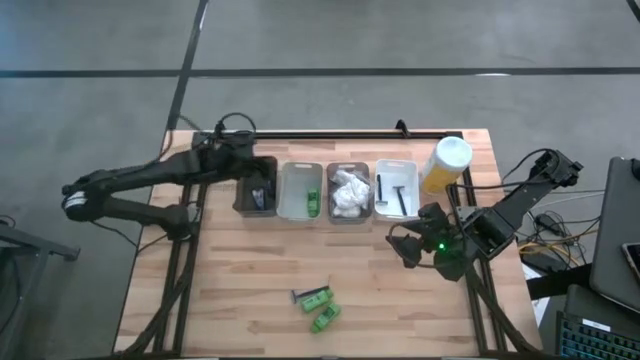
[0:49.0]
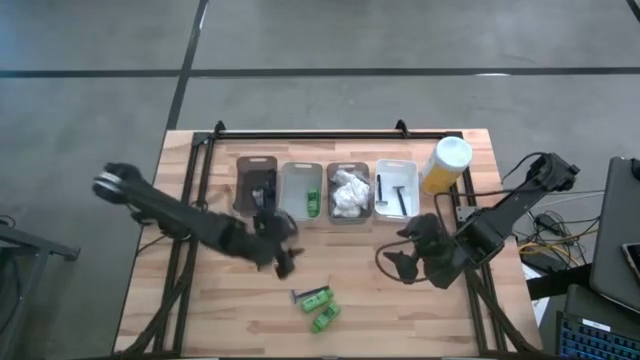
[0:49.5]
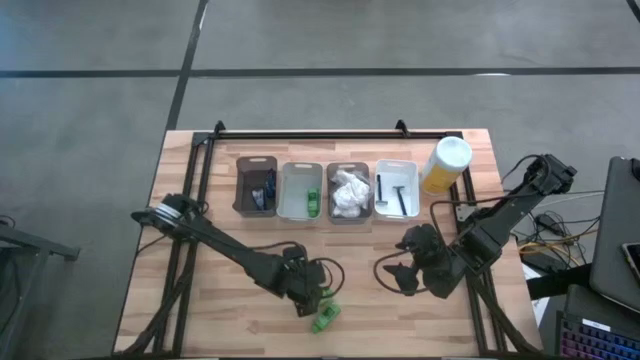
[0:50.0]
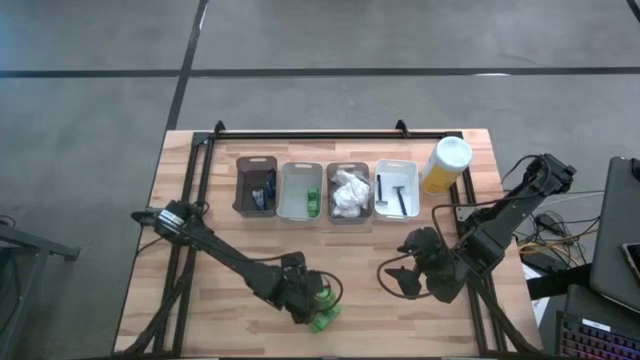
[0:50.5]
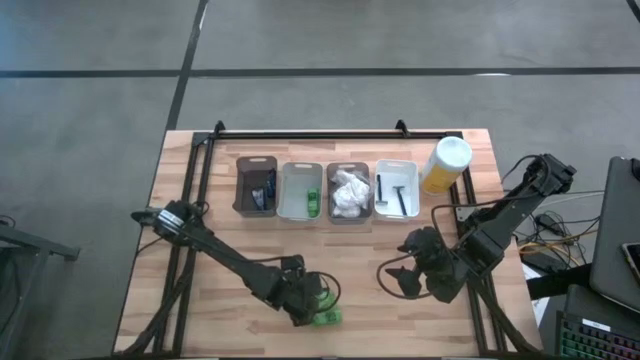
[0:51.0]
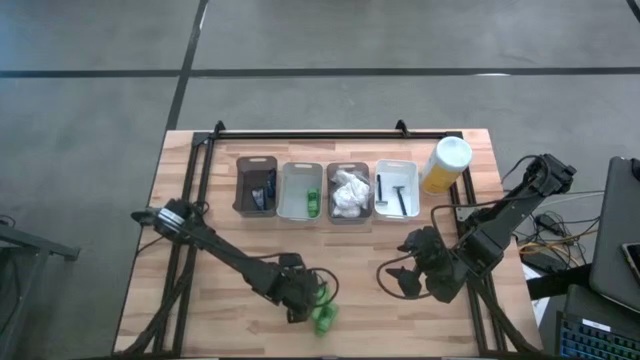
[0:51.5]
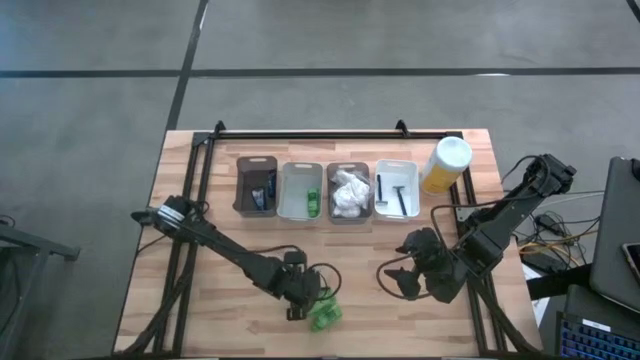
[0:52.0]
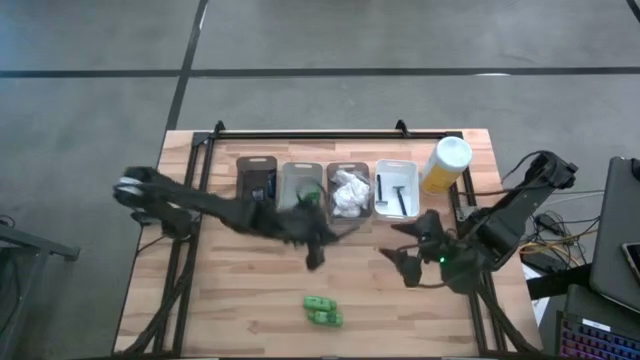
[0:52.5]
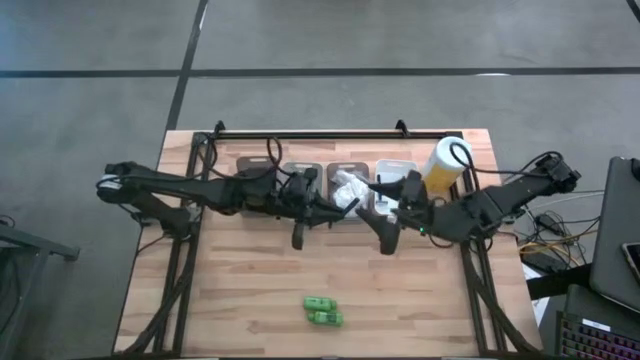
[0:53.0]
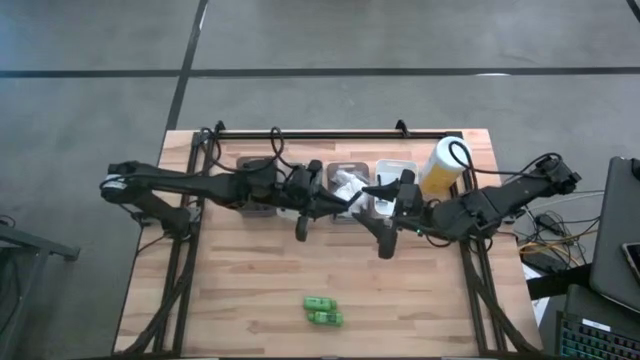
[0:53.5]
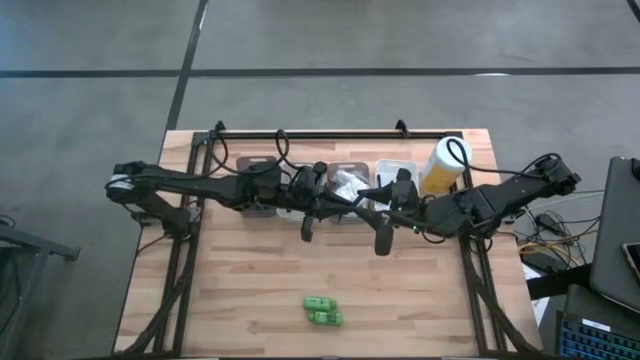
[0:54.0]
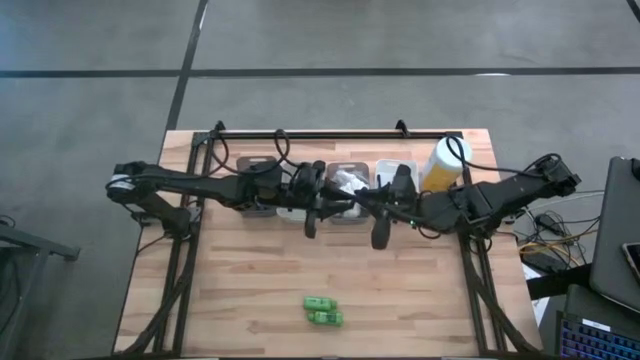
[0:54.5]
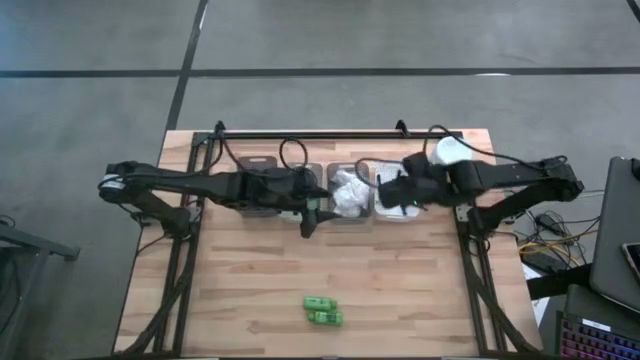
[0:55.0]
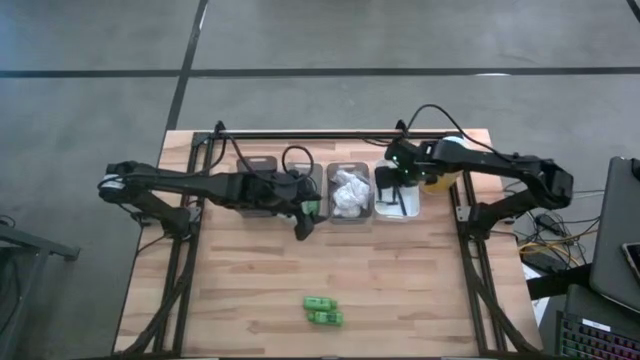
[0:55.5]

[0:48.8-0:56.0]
Task: Pick & Place Travel size toiletries
Put the blue razor into the white bin

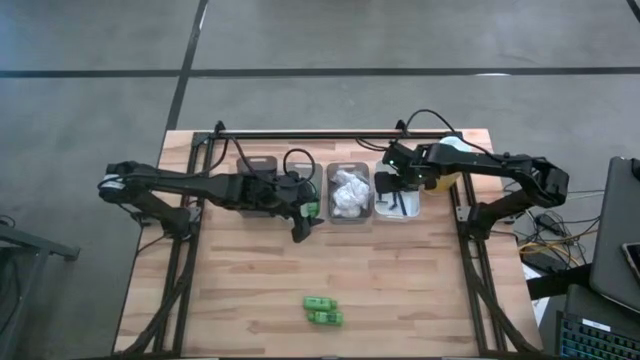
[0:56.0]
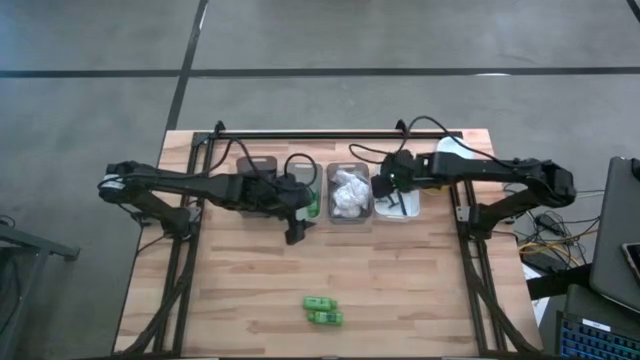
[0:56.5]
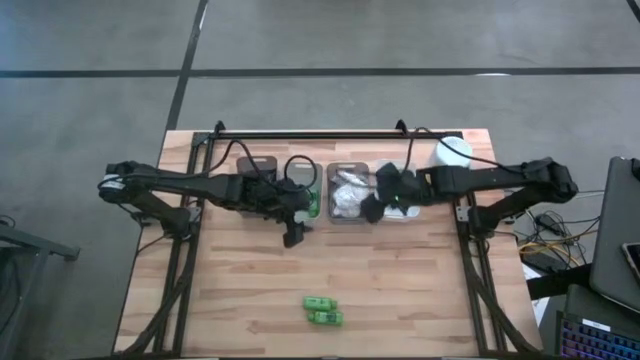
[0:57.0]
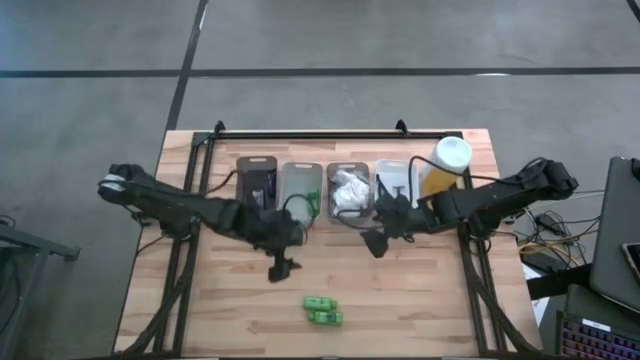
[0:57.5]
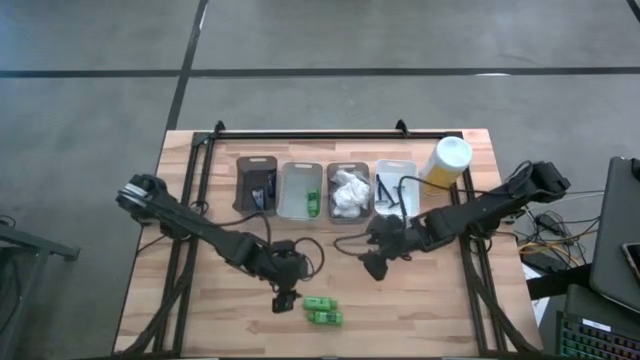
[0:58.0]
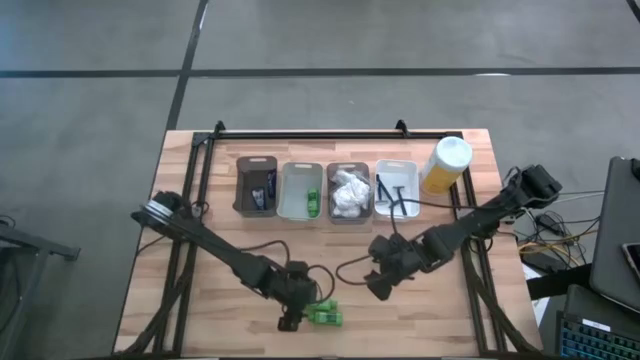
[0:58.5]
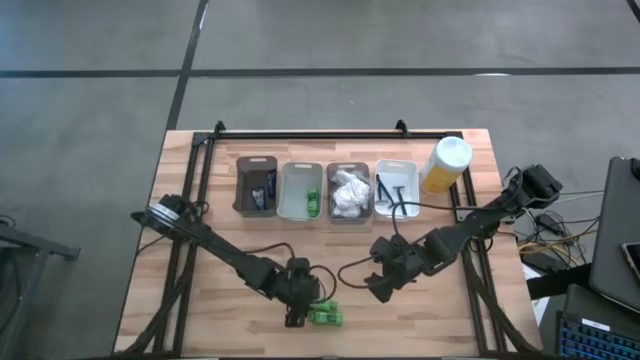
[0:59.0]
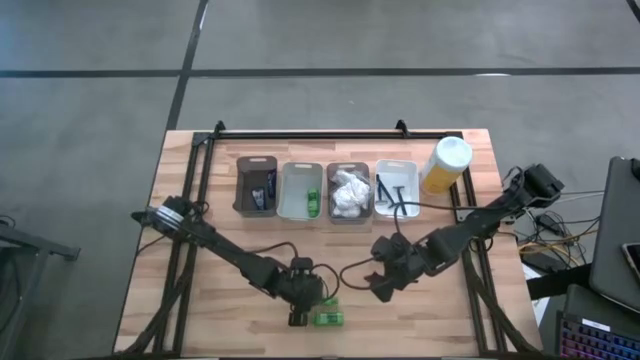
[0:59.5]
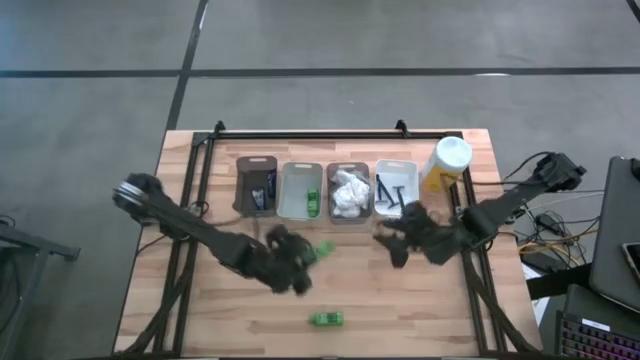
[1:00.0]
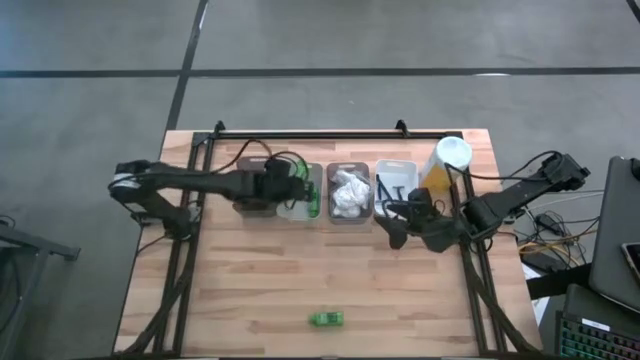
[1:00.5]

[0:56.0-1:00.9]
Put the green shampoo into the gray bin

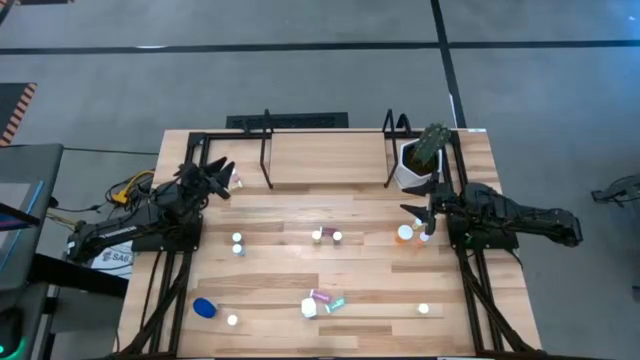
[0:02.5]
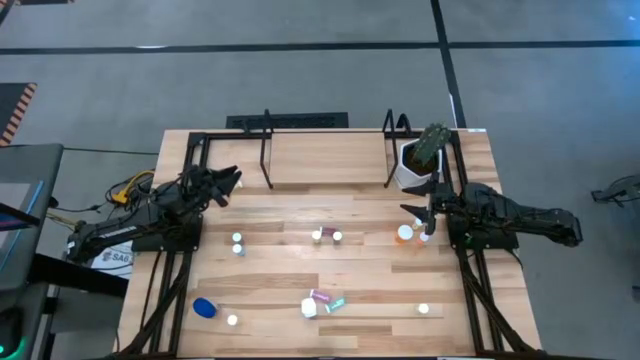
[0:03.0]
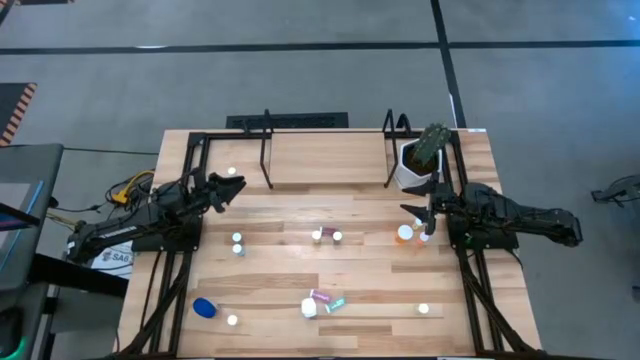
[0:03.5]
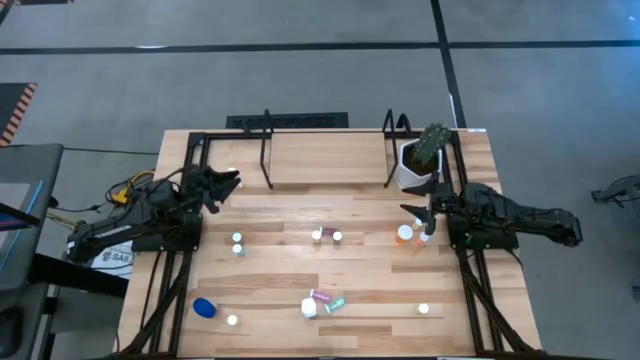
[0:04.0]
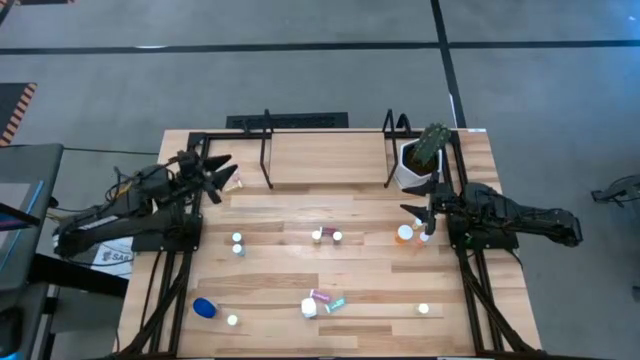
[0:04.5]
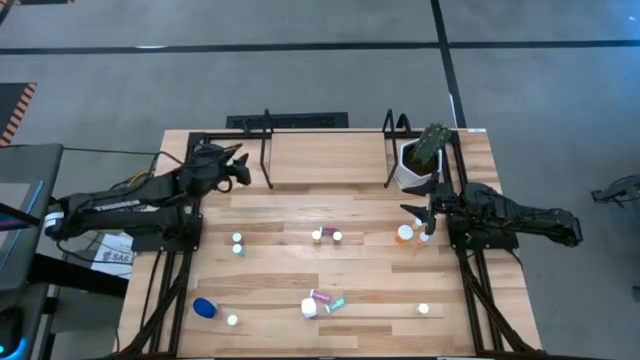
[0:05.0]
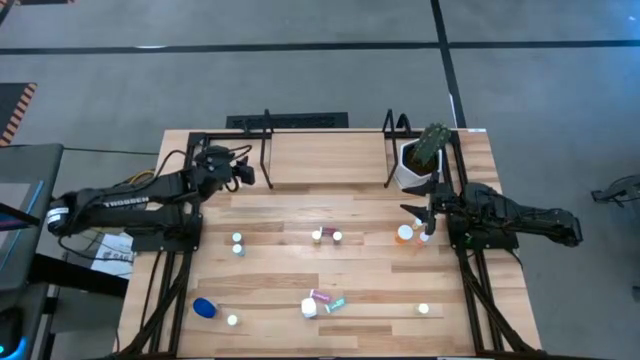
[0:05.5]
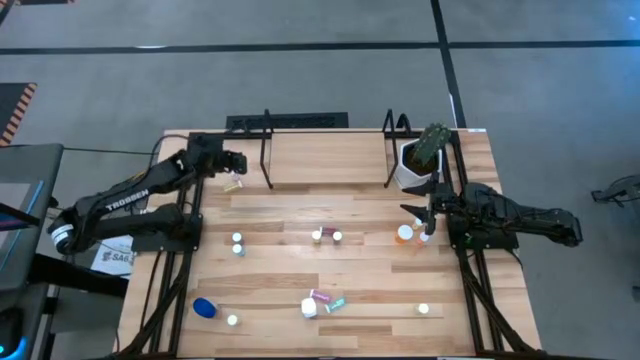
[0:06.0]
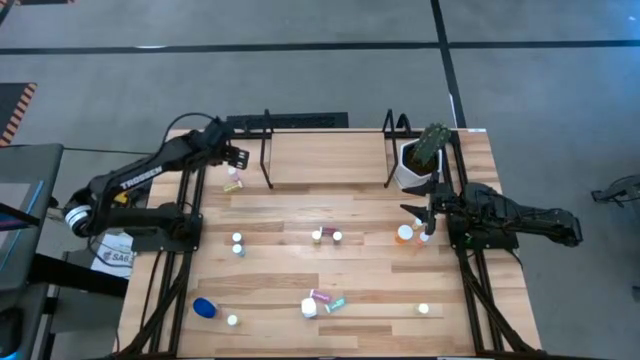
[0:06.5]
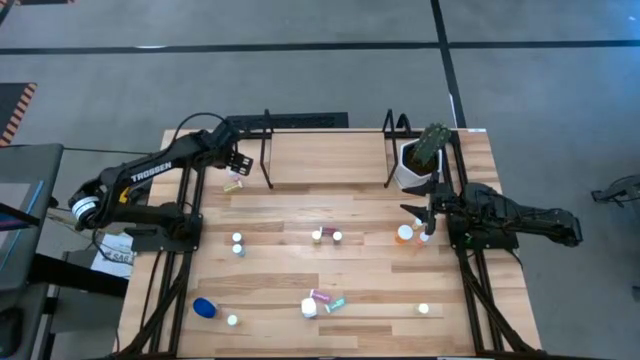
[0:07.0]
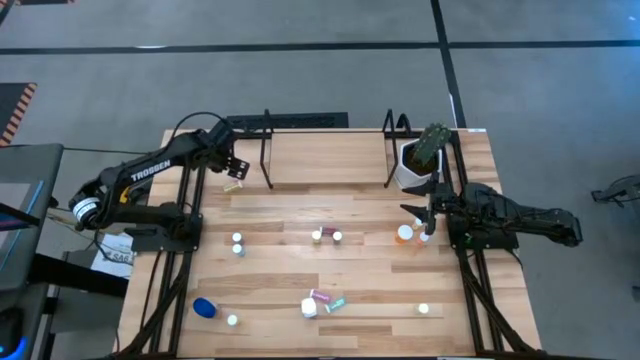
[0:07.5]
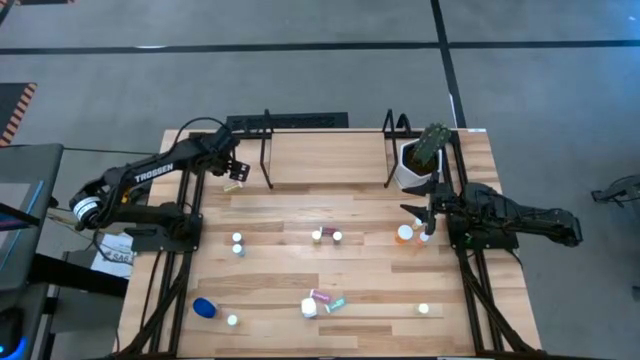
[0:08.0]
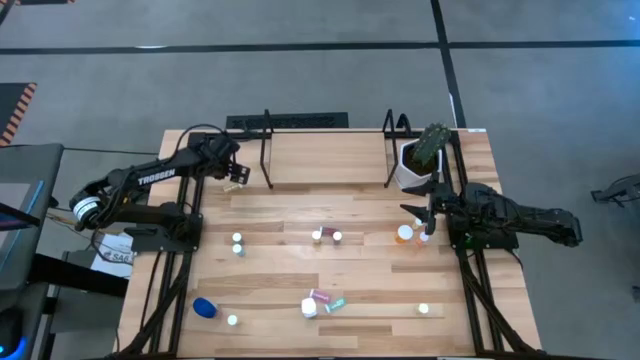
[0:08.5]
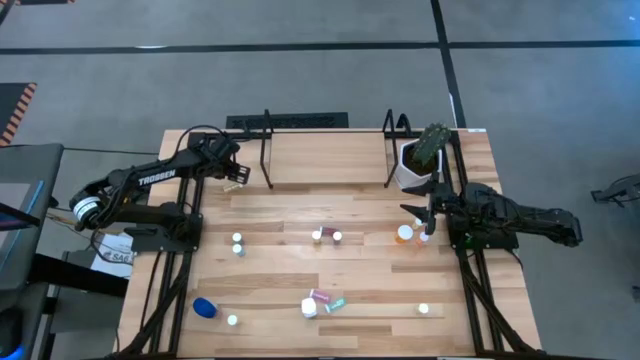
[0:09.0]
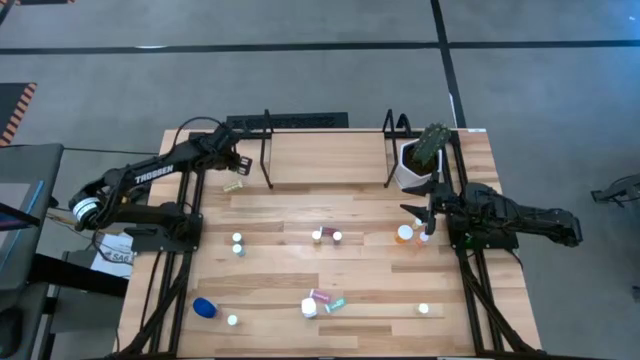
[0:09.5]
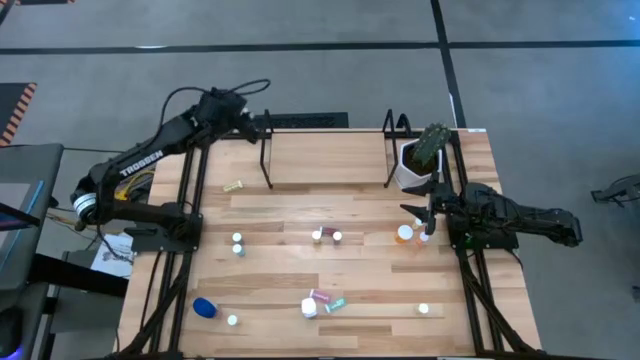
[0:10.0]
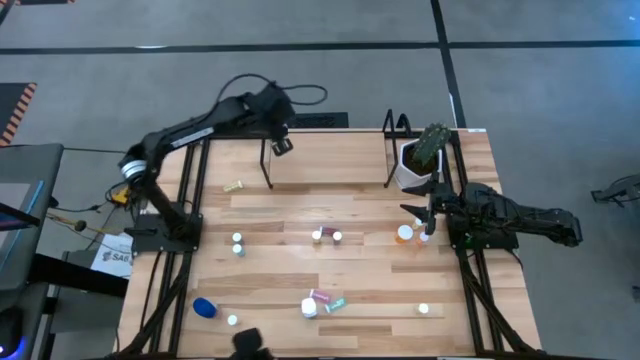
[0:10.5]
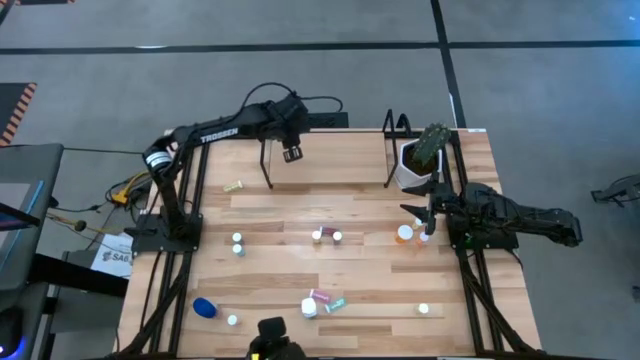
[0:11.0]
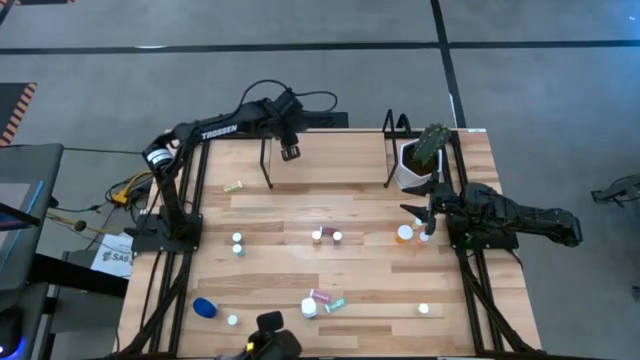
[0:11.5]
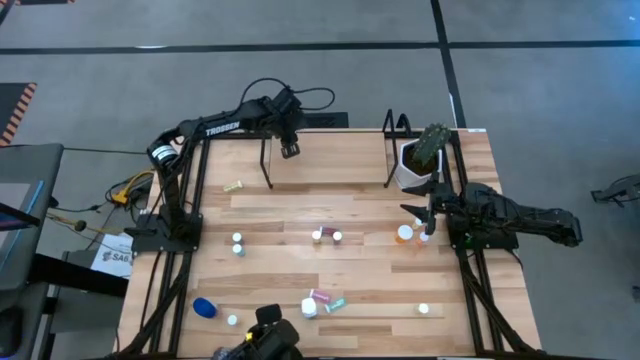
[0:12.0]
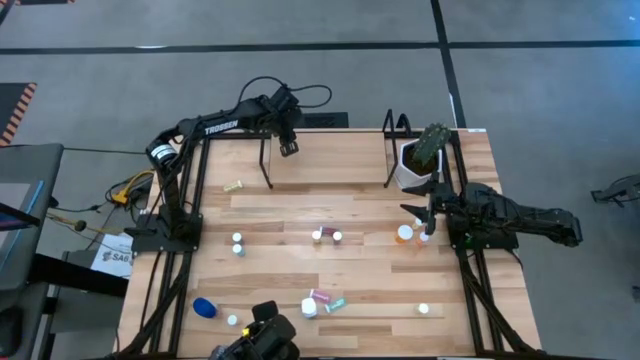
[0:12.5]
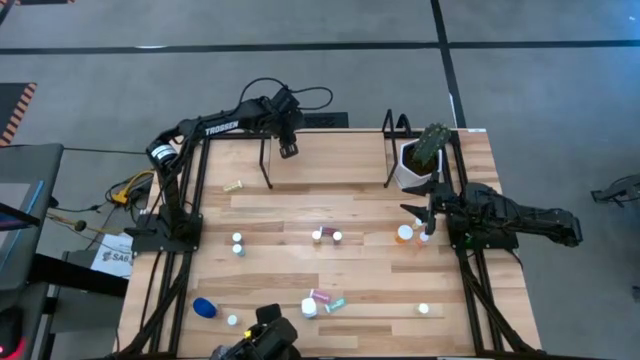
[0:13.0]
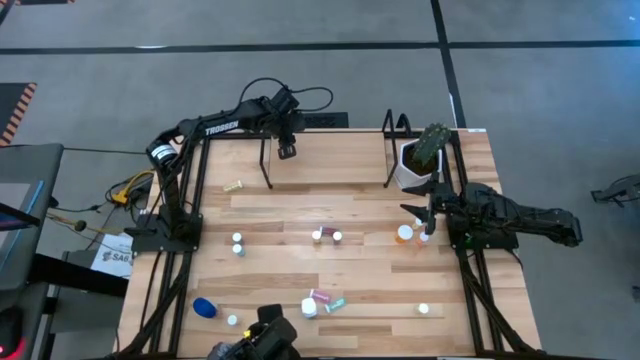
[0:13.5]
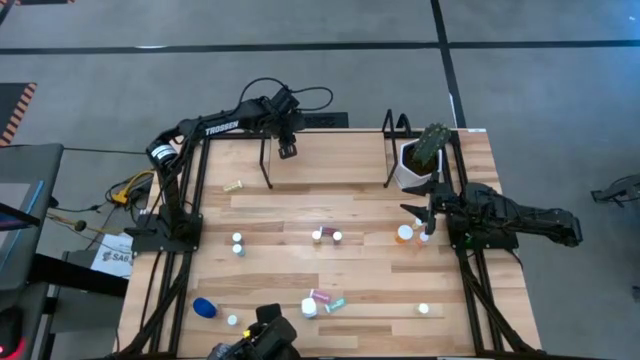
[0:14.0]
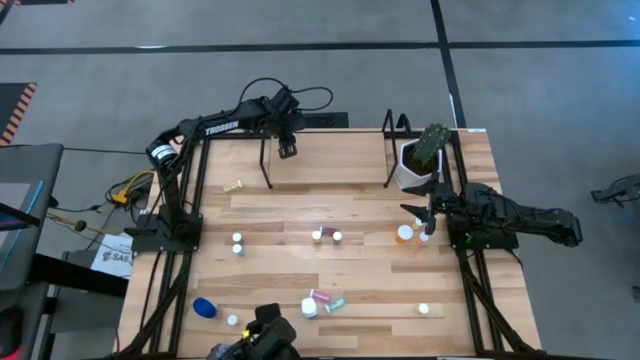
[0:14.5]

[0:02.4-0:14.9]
Task: Pick and place medicine bottles onto shelf by color
Put the left pink pill bottle on the shelf
